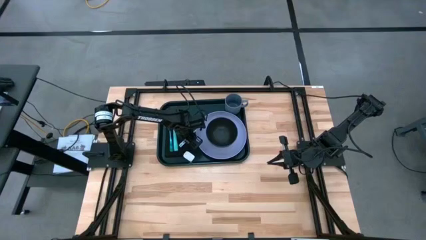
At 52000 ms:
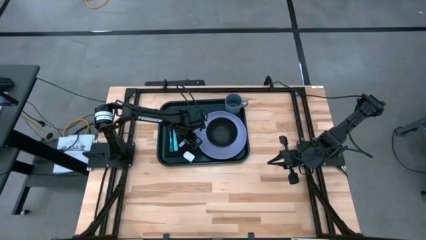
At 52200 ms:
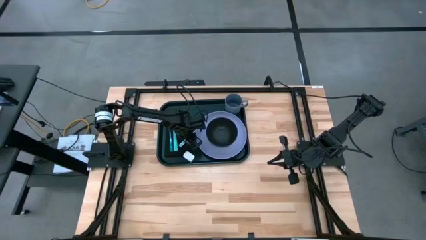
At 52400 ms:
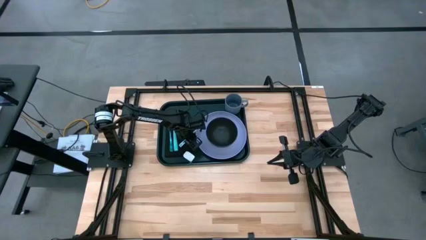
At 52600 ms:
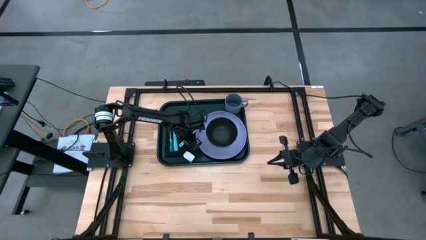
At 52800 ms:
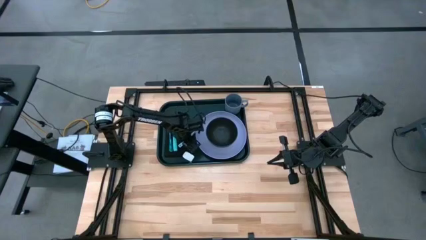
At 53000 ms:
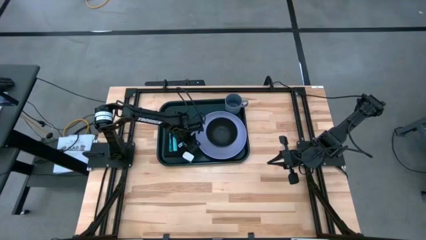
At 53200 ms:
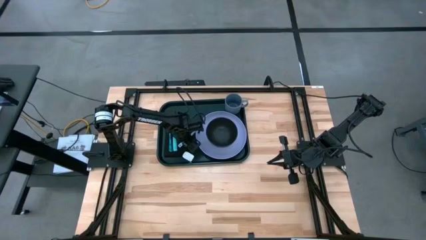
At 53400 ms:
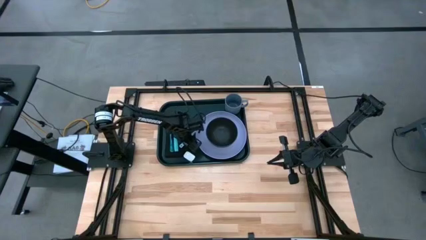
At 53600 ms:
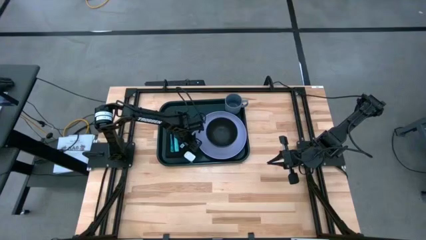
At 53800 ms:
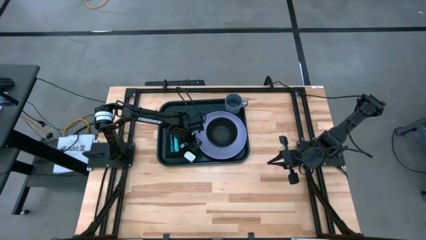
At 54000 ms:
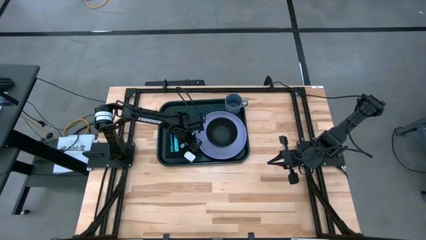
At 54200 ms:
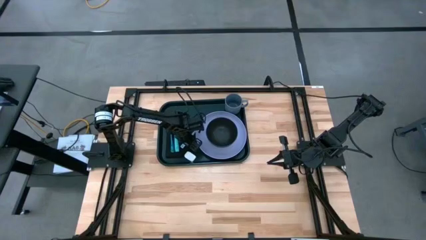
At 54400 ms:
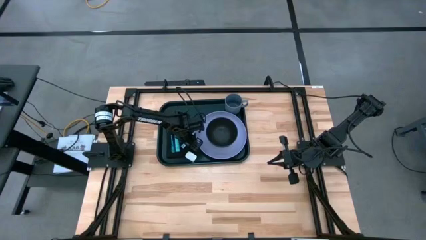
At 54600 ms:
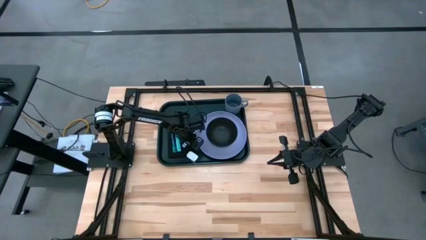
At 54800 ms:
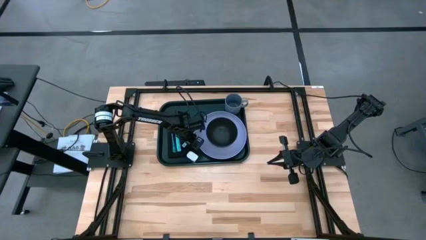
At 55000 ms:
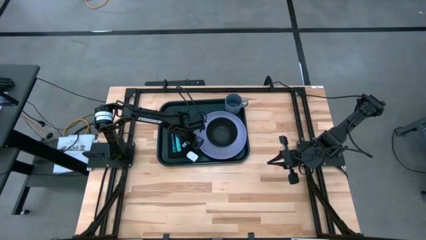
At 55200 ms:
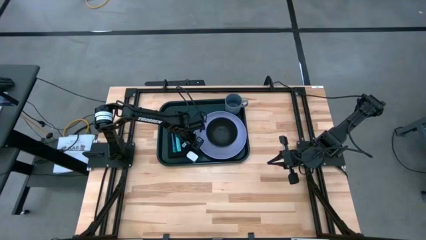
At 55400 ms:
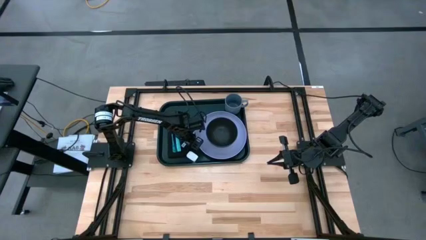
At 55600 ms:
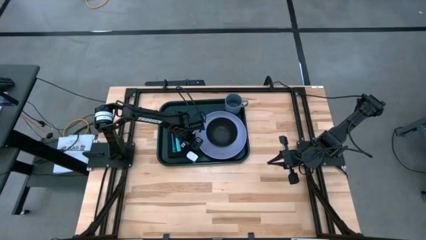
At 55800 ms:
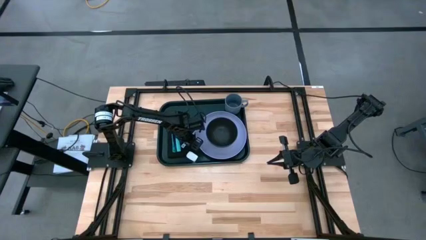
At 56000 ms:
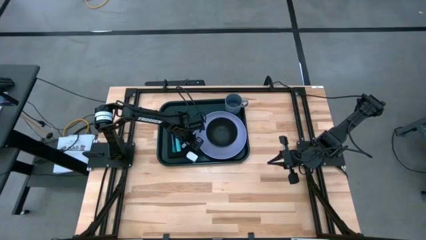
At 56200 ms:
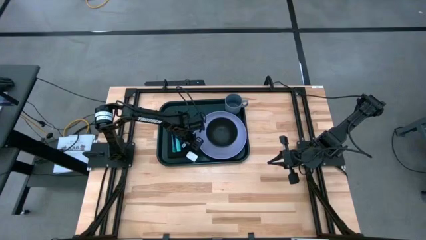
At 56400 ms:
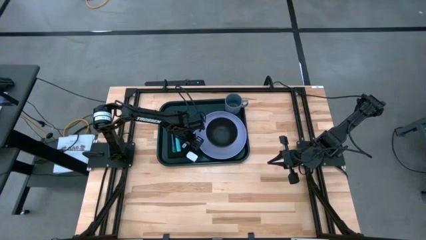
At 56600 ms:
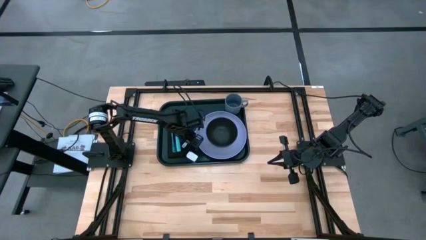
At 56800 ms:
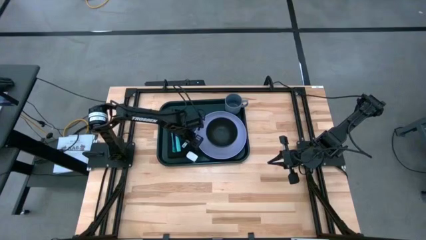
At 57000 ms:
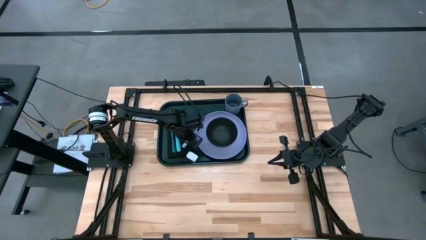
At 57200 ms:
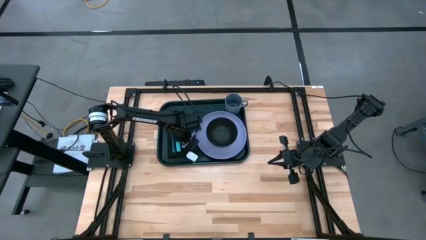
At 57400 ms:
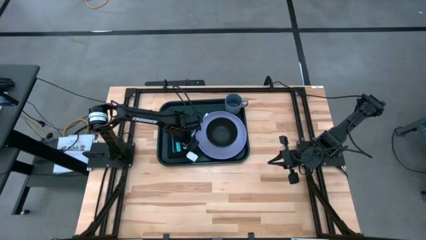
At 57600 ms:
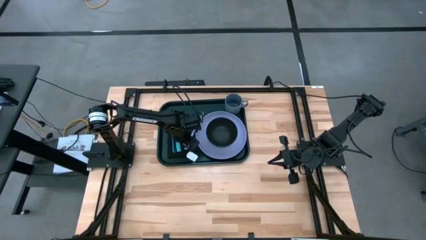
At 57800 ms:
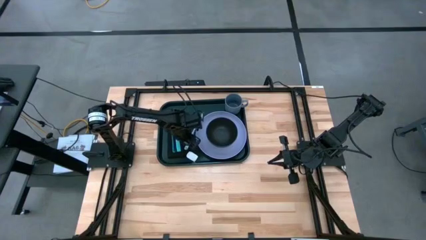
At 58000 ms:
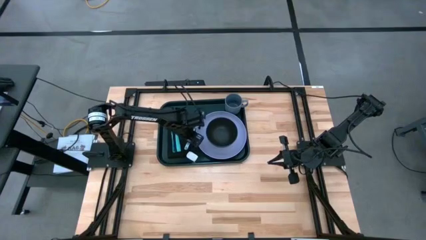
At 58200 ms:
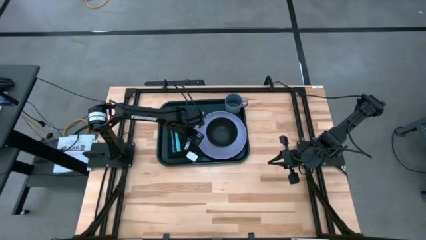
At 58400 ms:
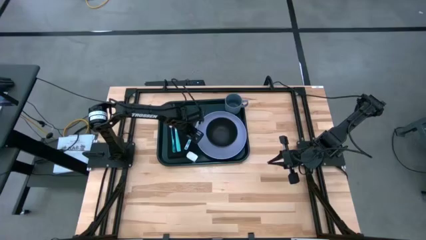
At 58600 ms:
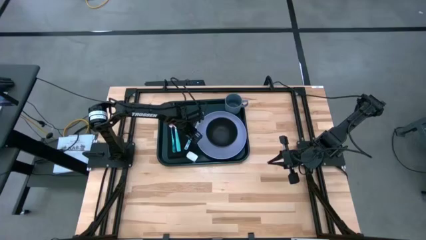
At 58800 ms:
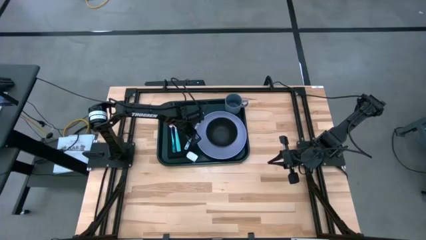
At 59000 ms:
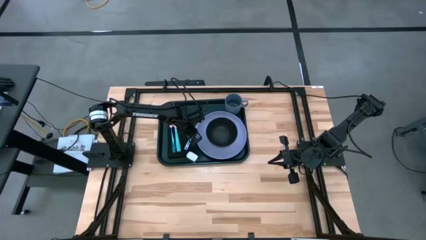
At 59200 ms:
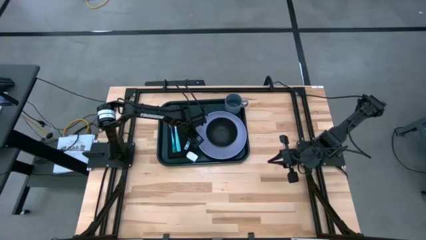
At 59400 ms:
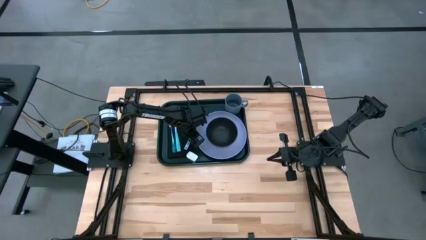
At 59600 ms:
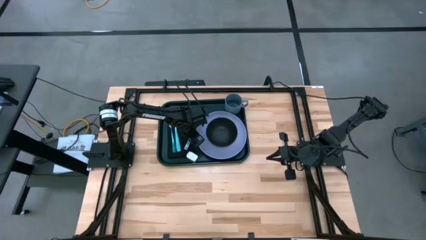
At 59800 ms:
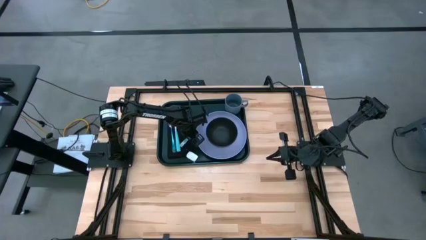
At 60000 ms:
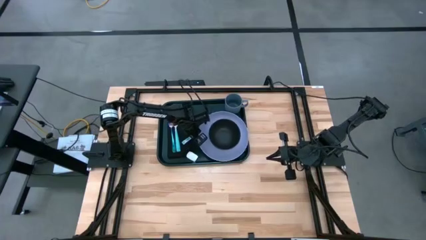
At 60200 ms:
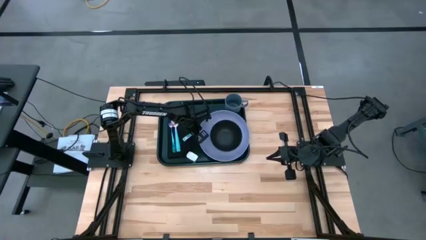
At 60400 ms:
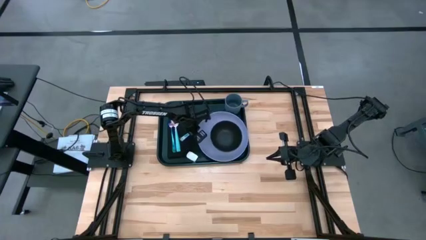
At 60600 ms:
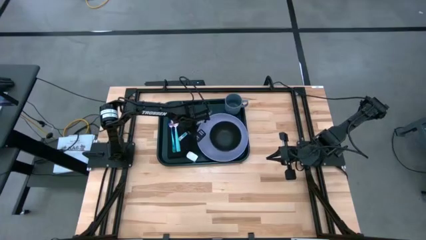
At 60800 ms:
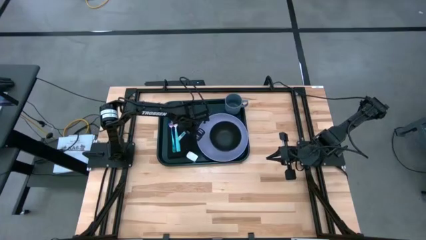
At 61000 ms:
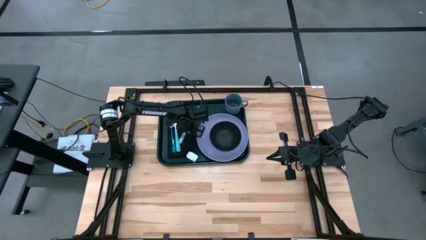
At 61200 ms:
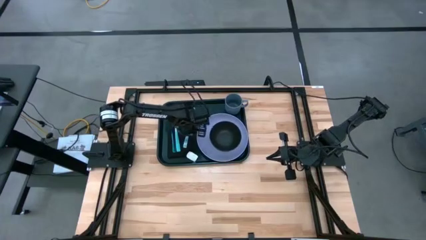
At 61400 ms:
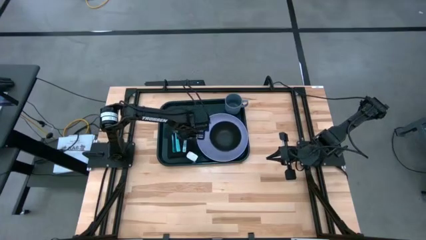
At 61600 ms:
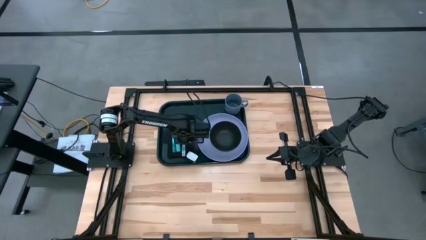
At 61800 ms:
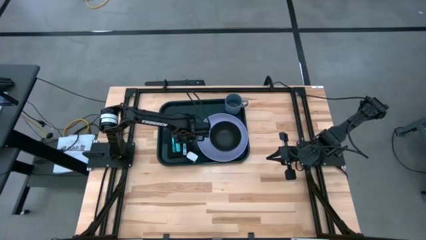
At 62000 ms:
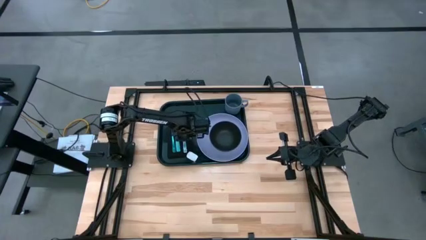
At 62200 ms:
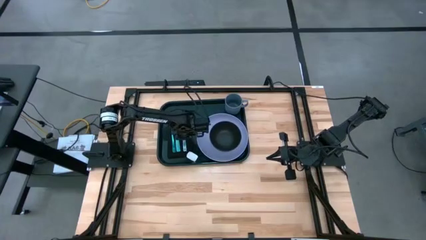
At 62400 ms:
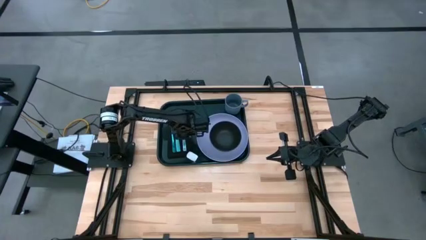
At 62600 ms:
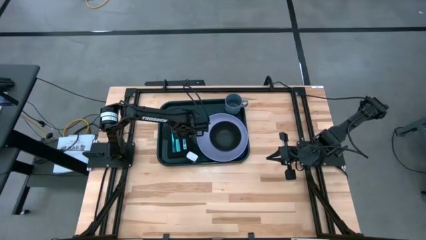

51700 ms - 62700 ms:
Task: Set up tray
Put the white knife on top of the black napkin to the right of the light blue spoon on the black serving tray

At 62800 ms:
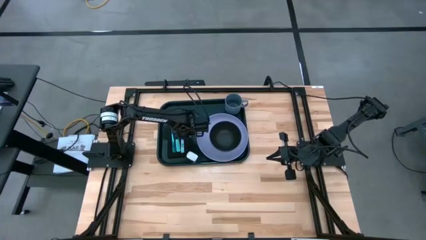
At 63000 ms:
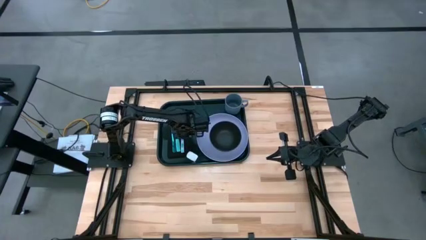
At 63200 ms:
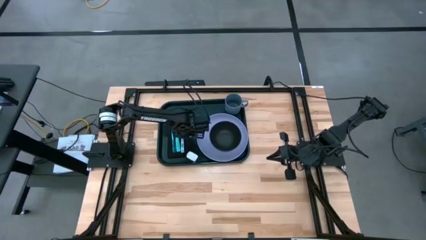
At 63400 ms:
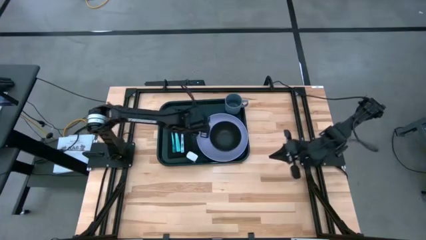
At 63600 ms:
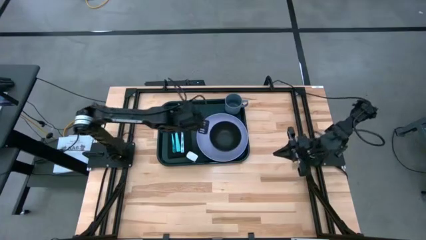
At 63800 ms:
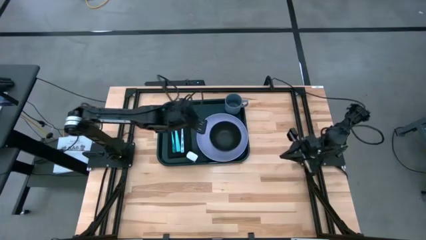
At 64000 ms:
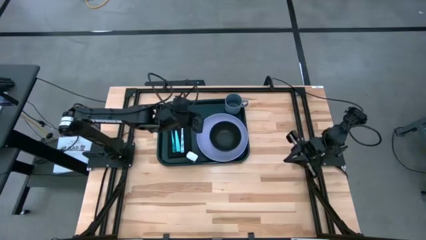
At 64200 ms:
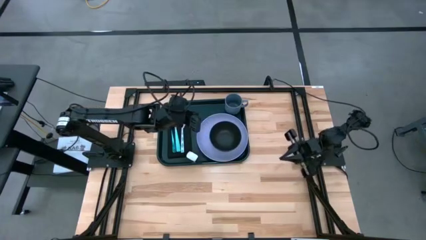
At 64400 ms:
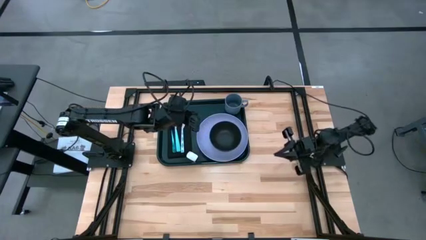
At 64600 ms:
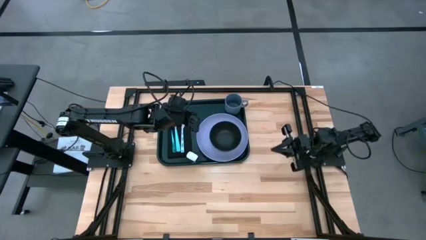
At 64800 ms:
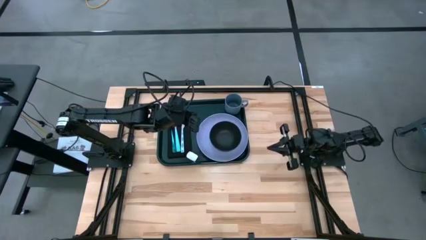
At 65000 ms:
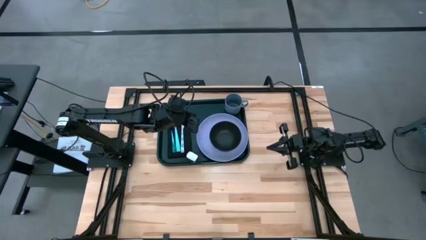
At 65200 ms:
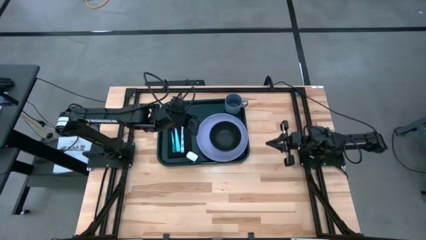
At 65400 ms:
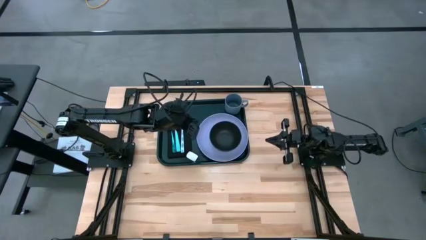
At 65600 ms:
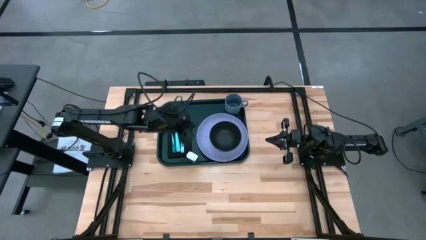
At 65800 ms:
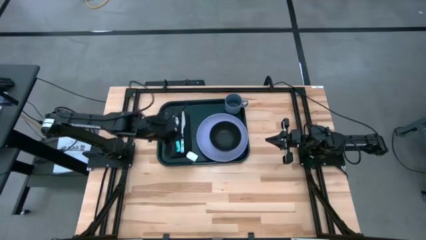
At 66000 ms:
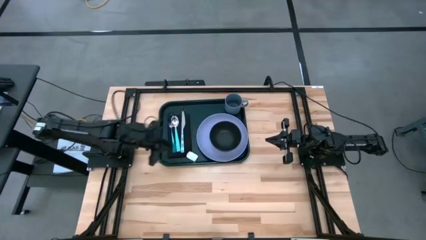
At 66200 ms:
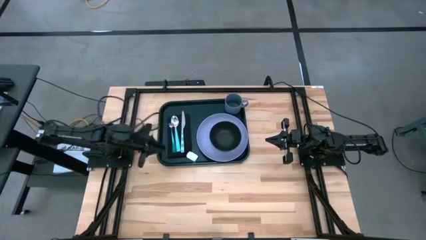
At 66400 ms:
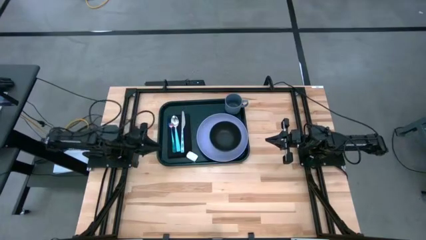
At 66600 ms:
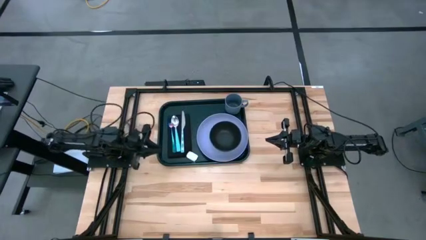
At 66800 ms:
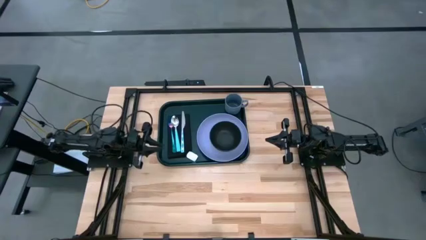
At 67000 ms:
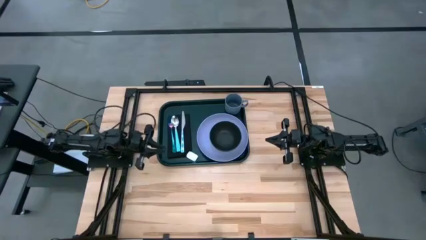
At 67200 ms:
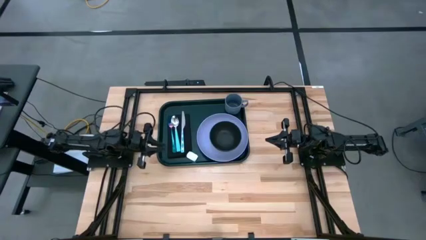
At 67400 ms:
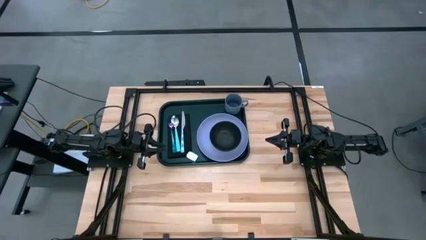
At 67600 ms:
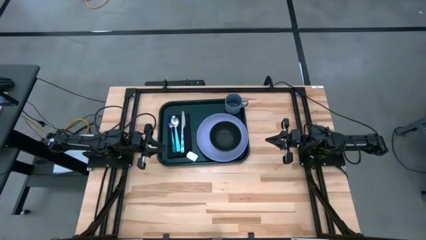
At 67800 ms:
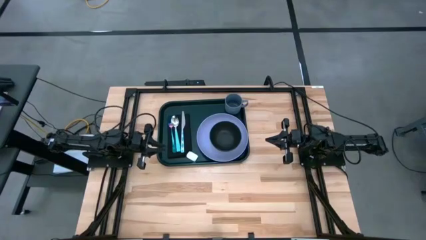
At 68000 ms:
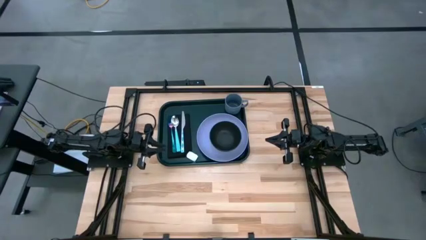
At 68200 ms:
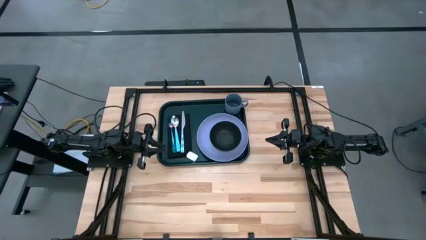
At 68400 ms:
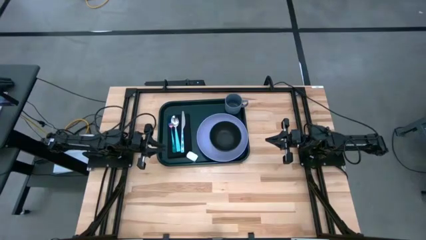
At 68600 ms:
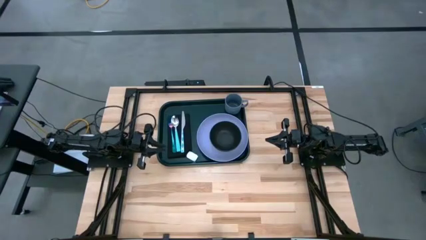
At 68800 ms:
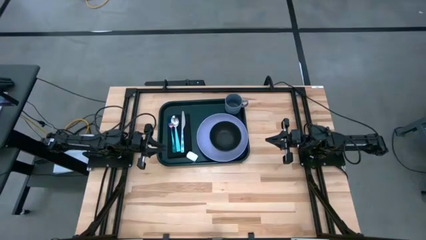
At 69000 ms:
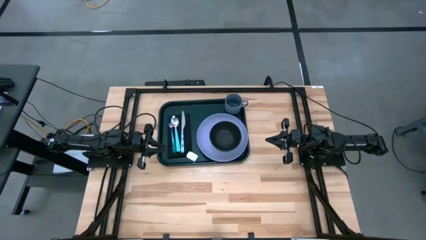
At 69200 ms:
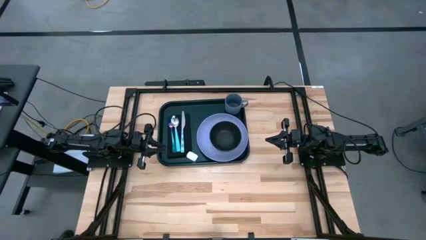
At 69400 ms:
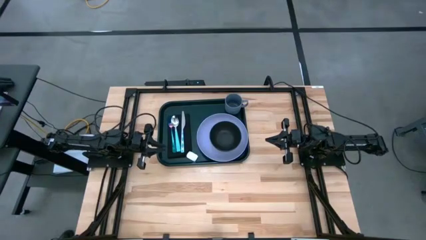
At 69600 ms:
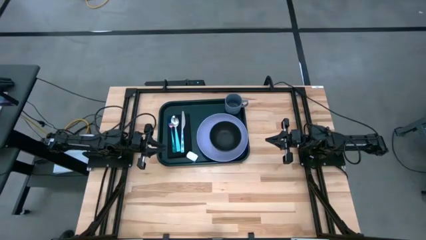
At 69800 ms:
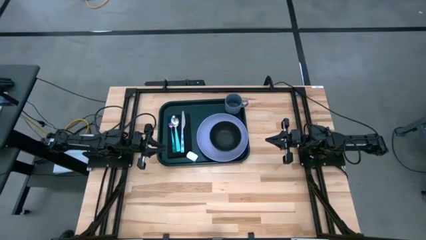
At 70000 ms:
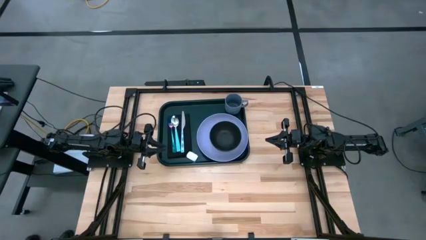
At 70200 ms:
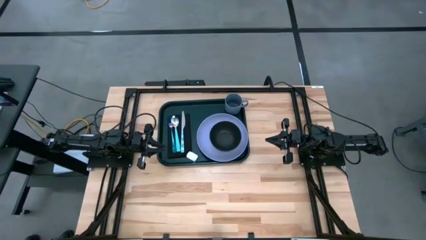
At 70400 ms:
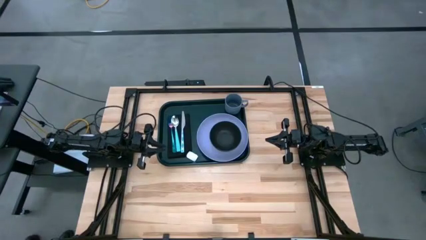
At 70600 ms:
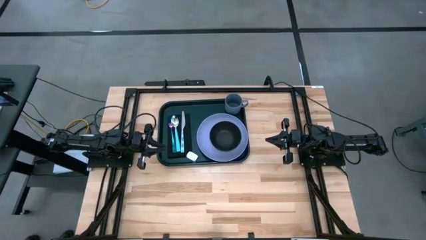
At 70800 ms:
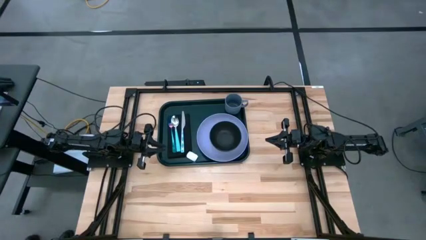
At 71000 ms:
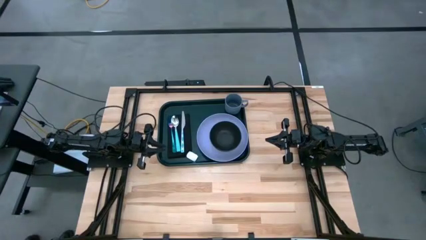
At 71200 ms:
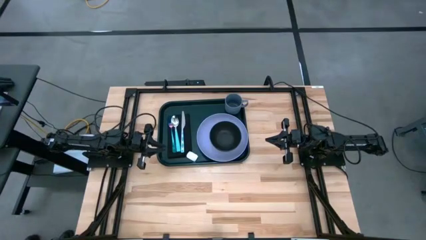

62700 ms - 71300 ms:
Return to Home Position
